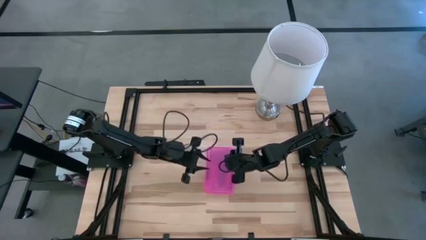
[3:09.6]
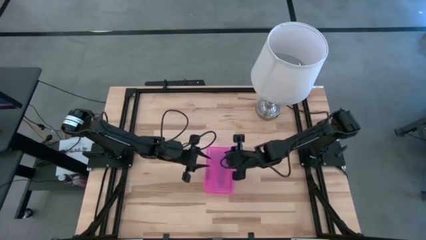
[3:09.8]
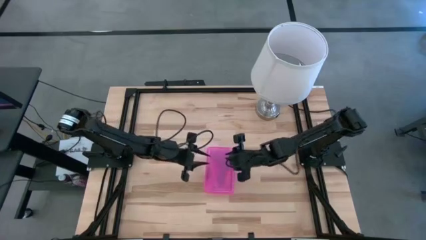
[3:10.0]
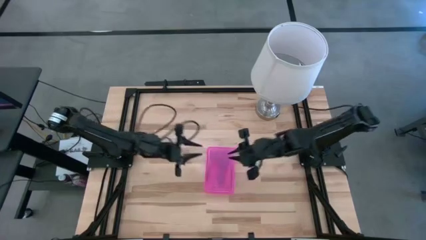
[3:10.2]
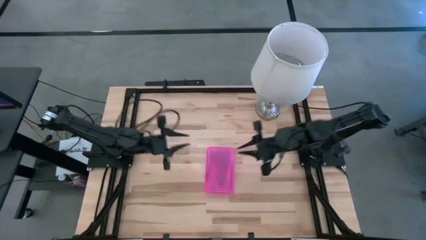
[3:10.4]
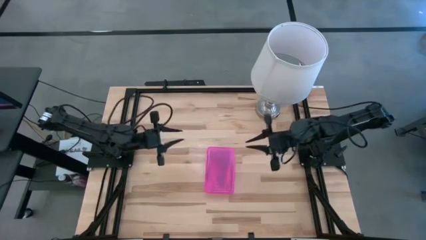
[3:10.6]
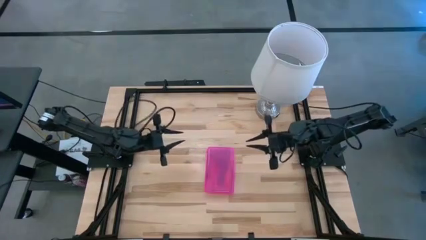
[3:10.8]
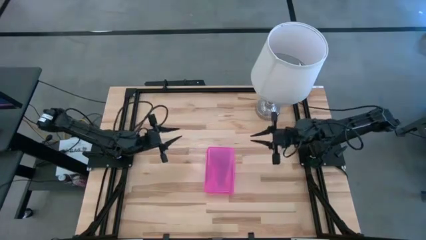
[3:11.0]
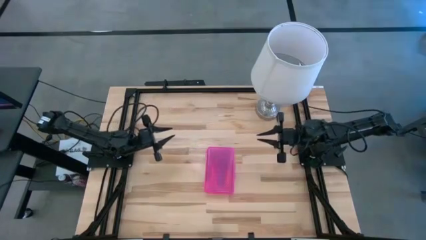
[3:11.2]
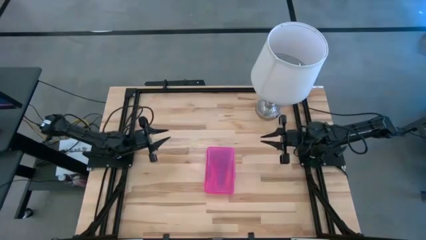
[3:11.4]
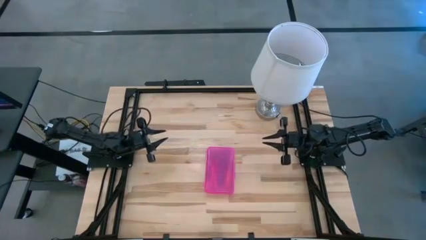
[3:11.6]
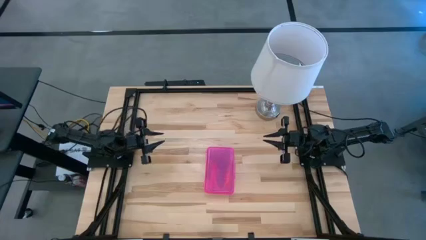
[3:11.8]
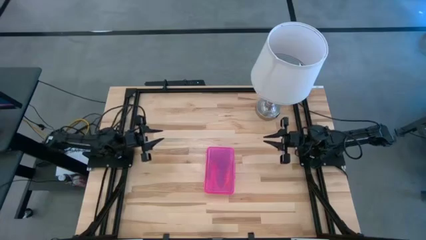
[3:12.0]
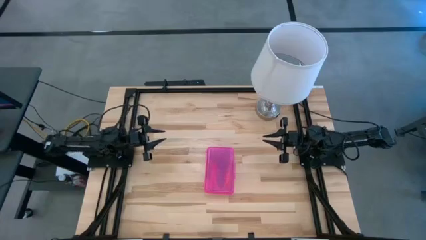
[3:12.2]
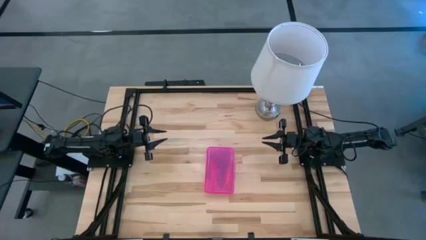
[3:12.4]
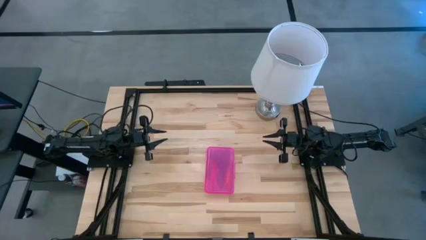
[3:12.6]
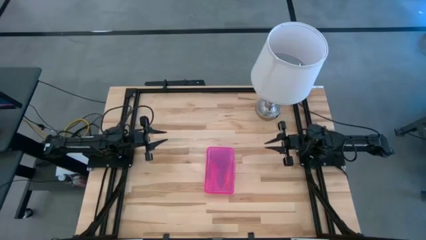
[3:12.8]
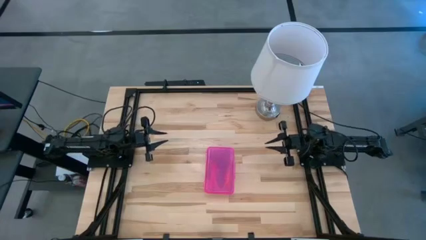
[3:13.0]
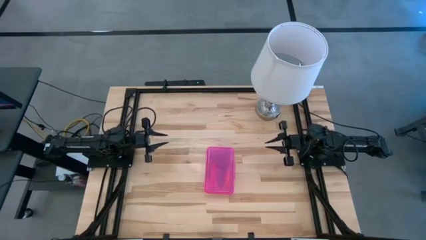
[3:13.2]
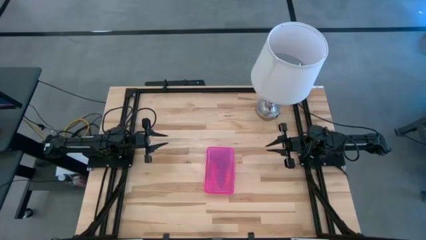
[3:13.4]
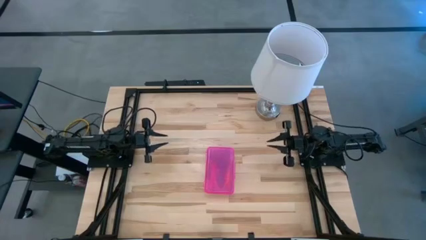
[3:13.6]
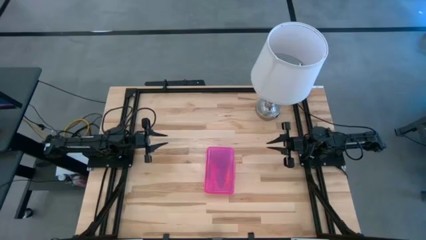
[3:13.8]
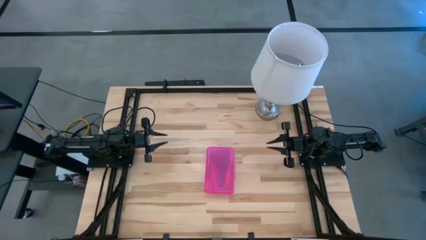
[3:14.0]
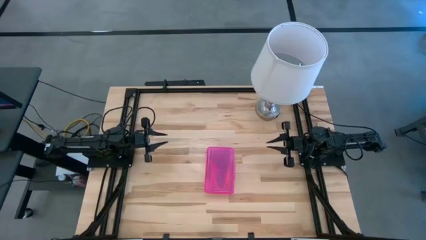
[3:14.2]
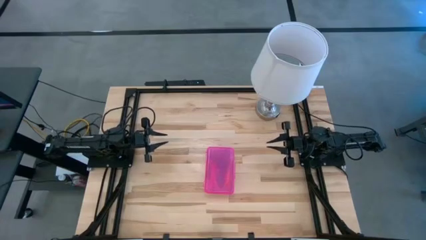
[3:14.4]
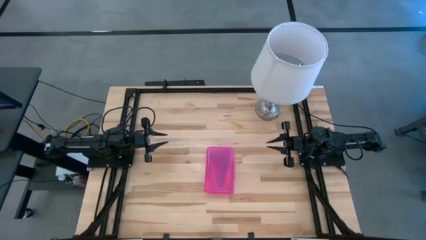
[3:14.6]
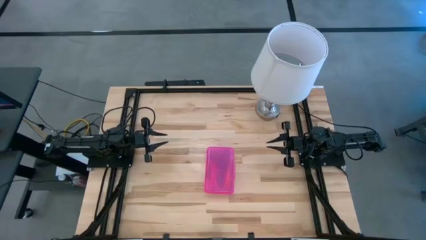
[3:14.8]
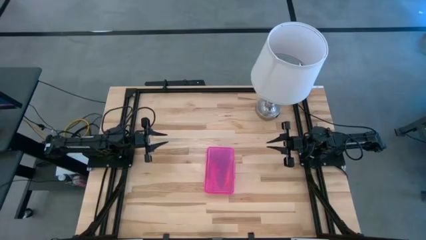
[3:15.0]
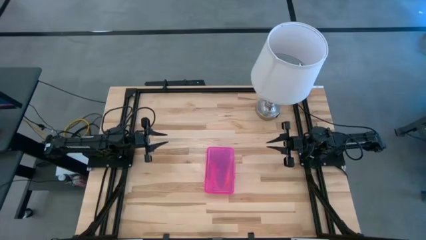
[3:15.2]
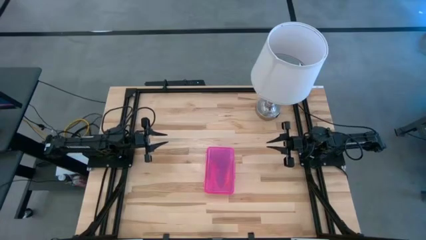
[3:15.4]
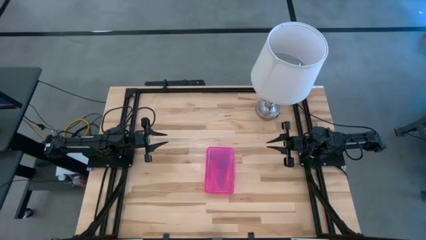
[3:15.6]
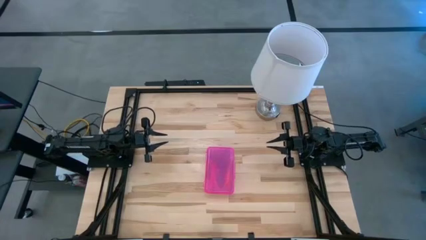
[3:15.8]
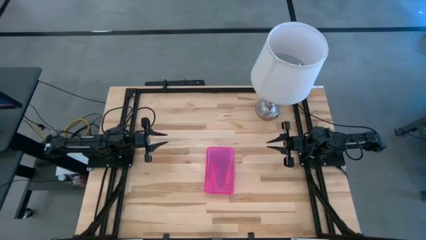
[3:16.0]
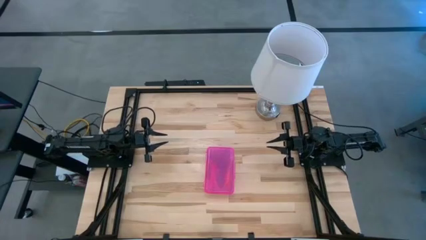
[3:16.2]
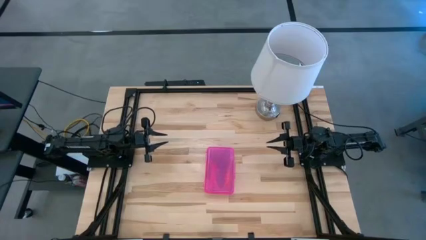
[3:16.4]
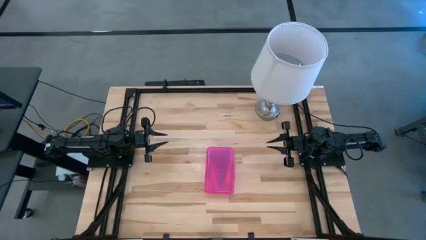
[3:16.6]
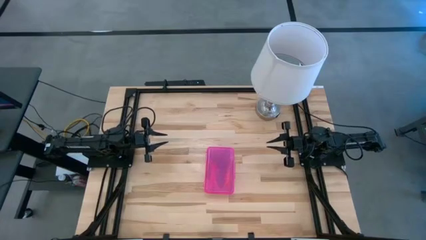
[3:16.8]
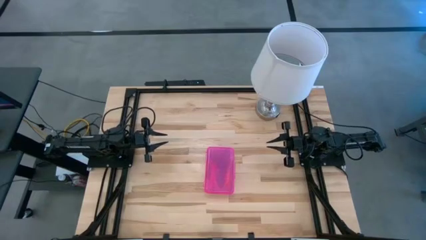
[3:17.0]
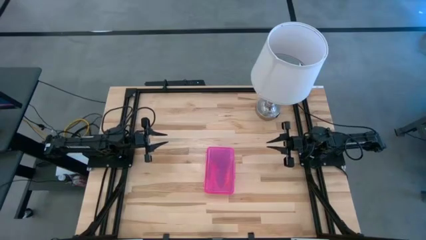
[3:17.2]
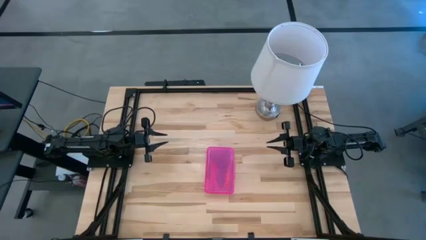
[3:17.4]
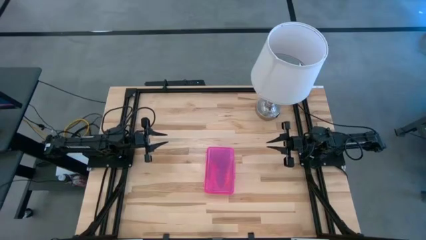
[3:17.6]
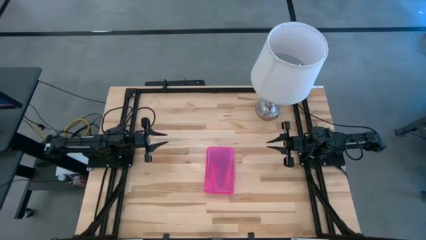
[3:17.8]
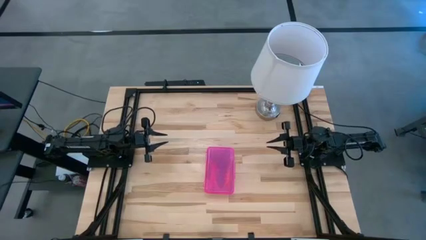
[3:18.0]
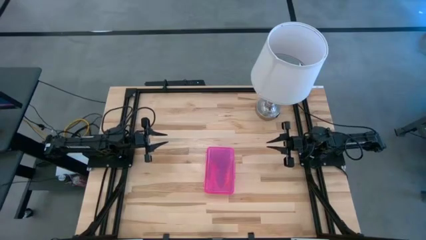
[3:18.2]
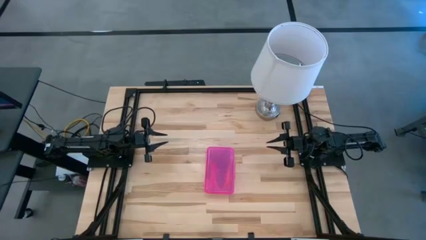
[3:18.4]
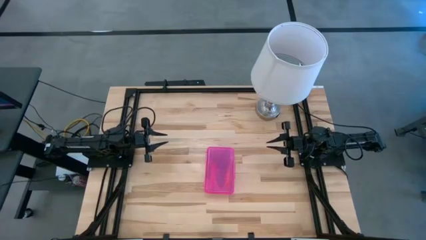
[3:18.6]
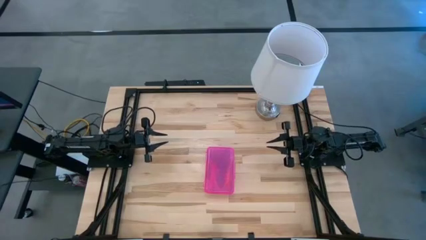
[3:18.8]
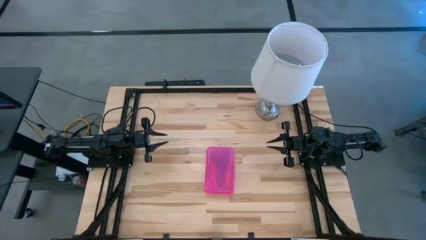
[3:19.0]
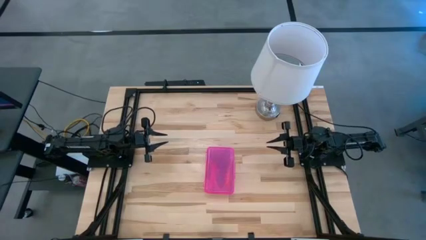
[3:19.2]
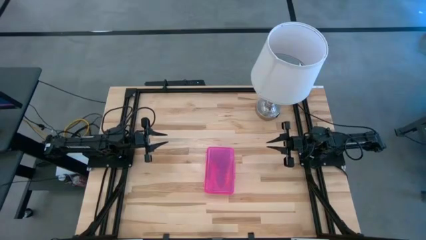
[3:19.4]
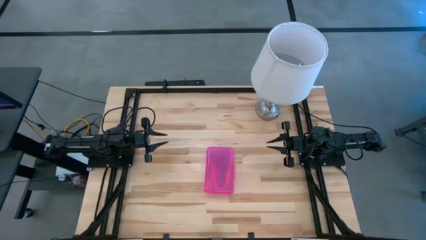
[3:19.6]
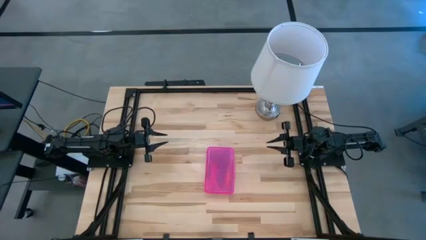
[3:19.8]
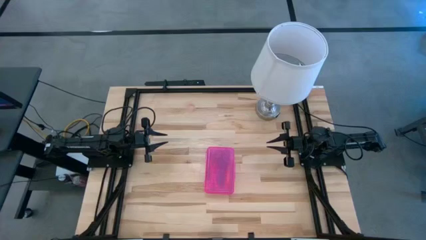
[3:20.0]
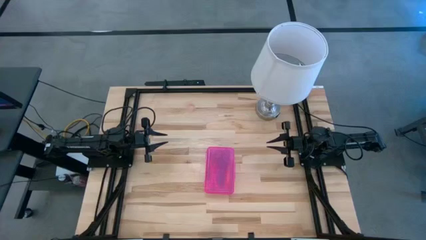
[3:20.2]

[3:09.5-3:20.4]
Task: Pick & place school supplies into a supply box
Return to Home Position
